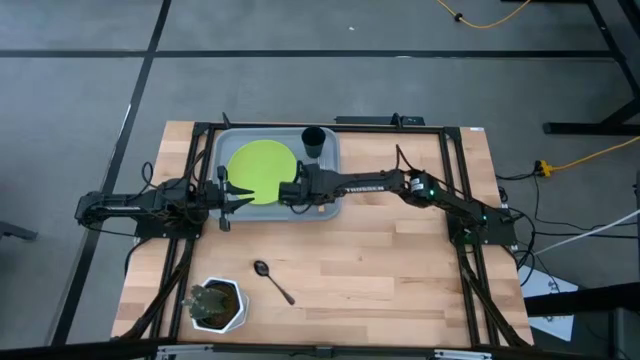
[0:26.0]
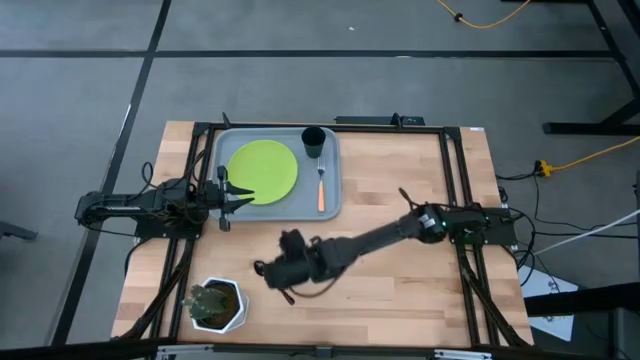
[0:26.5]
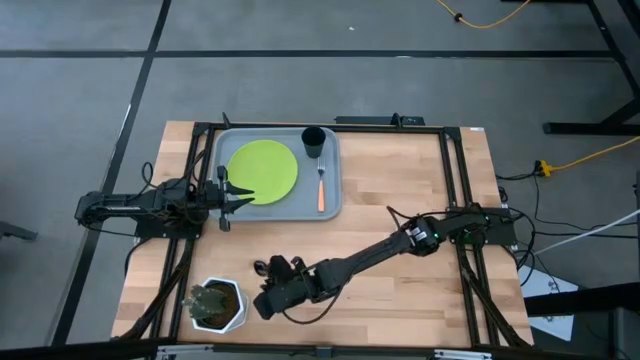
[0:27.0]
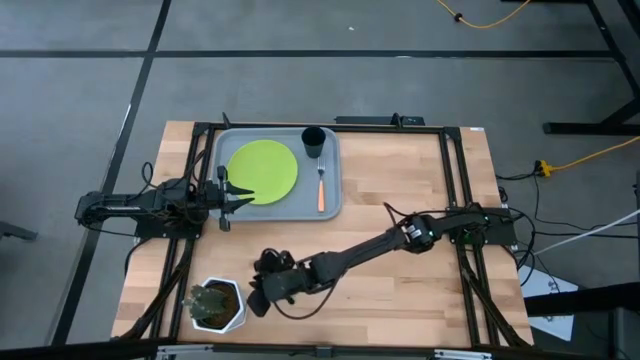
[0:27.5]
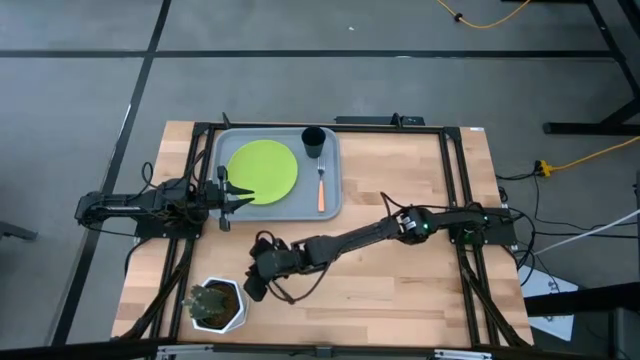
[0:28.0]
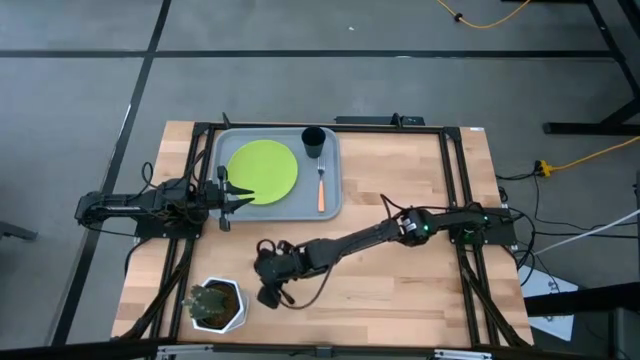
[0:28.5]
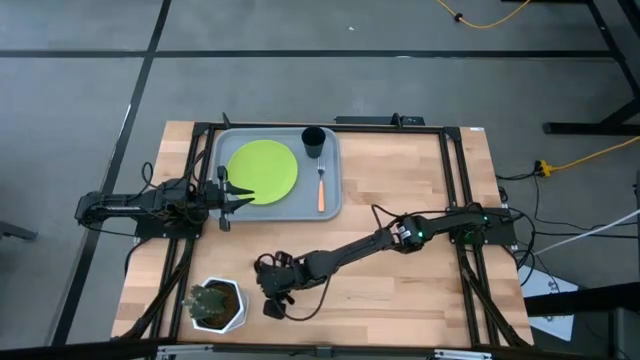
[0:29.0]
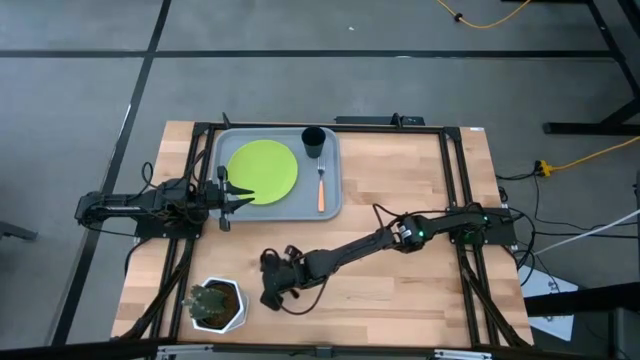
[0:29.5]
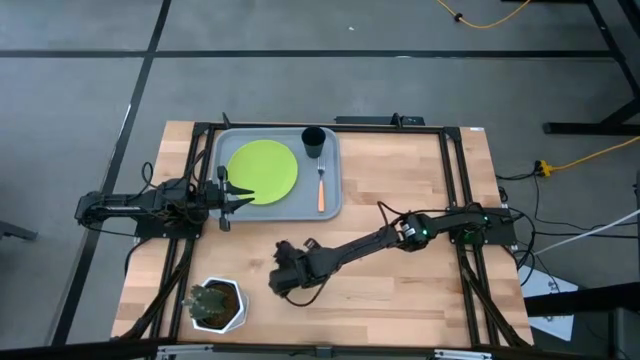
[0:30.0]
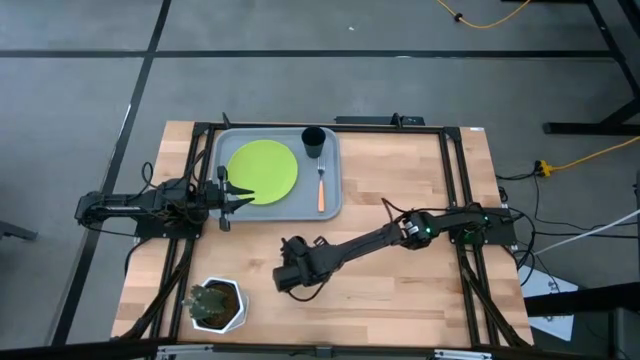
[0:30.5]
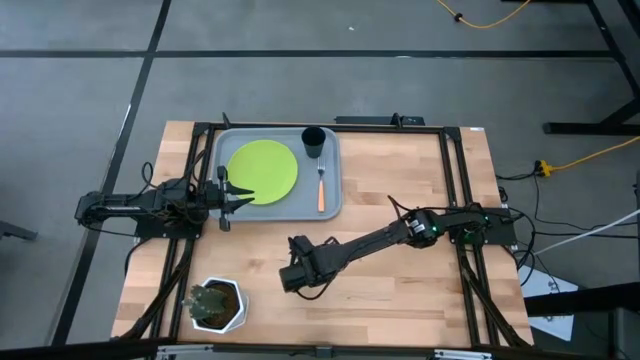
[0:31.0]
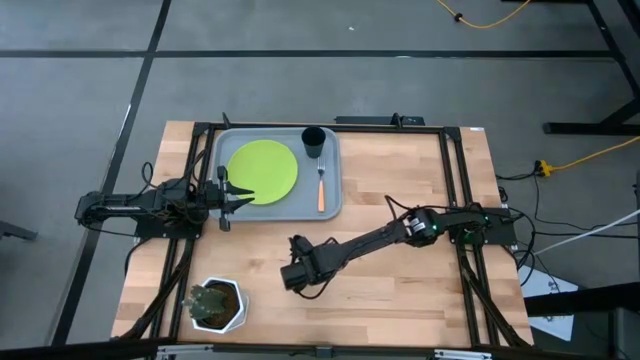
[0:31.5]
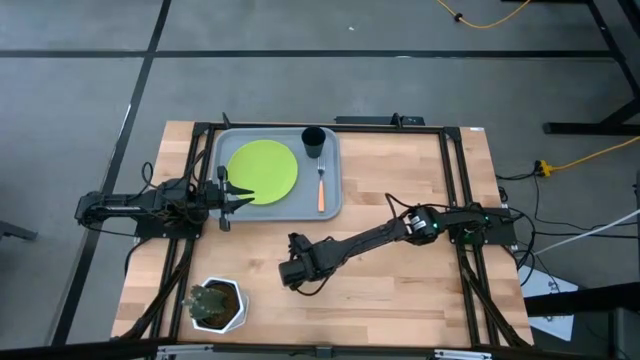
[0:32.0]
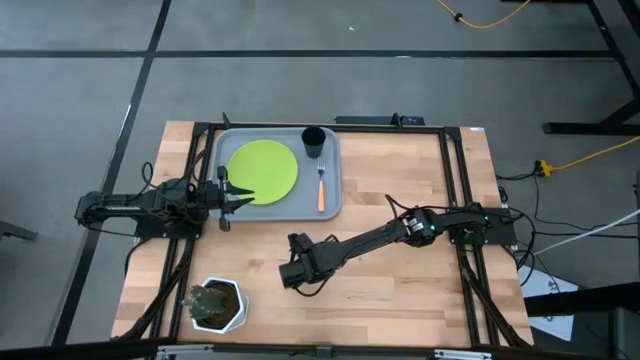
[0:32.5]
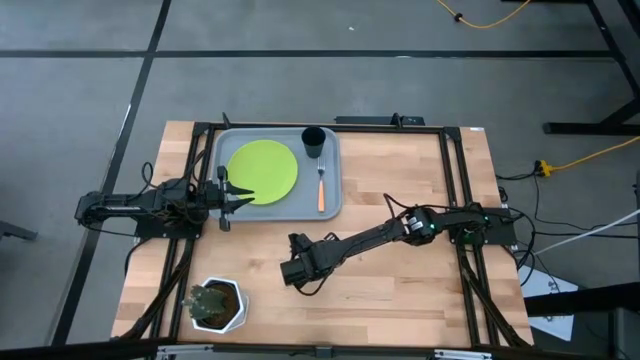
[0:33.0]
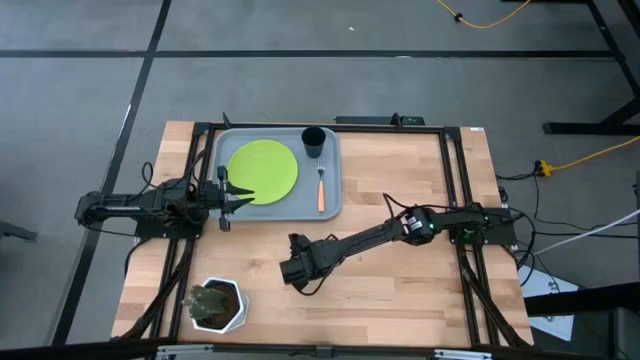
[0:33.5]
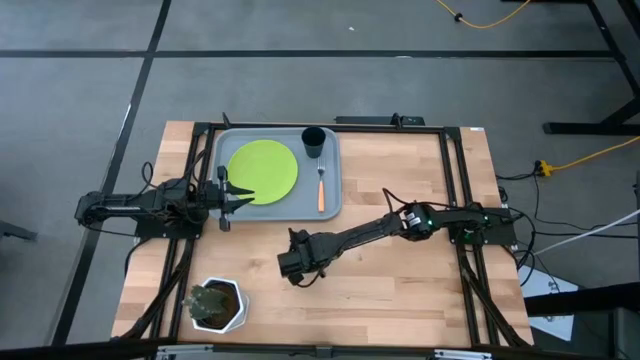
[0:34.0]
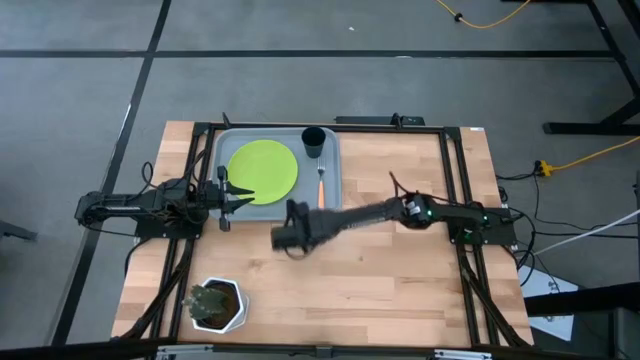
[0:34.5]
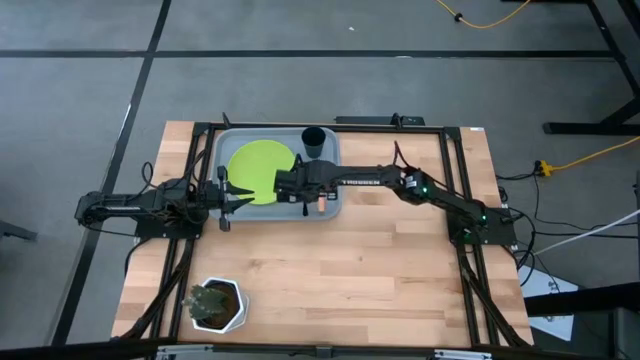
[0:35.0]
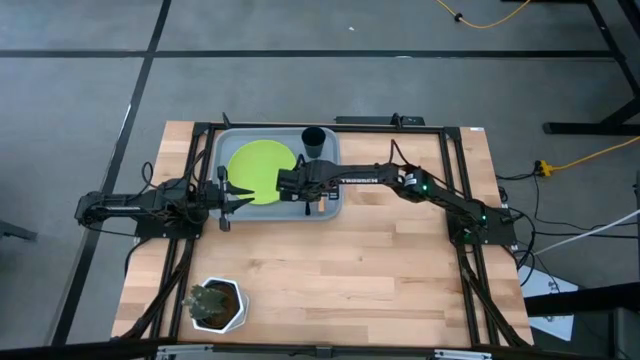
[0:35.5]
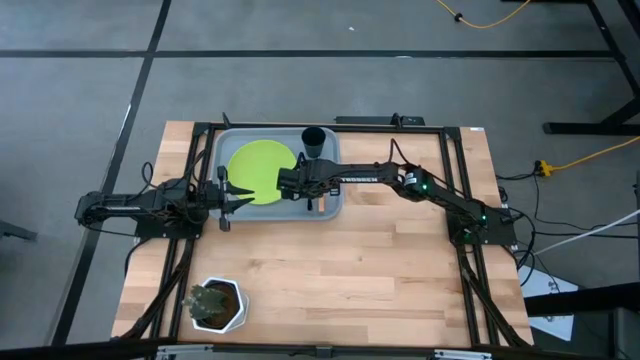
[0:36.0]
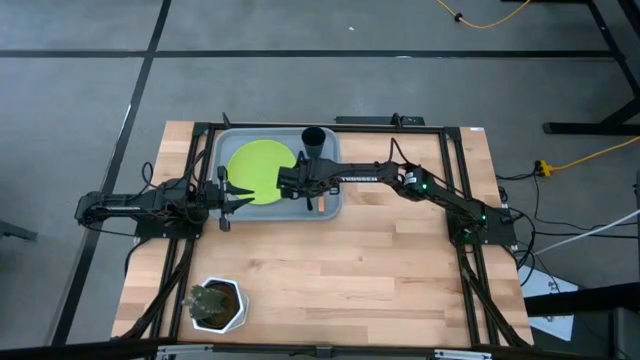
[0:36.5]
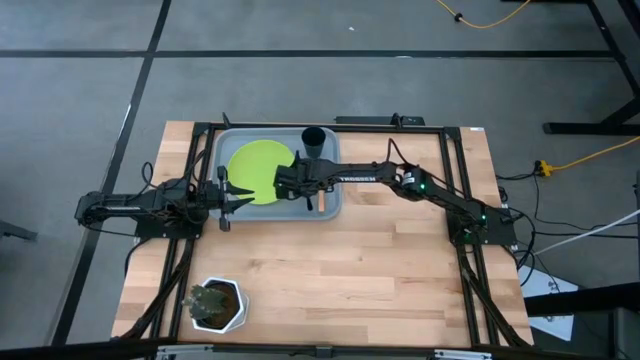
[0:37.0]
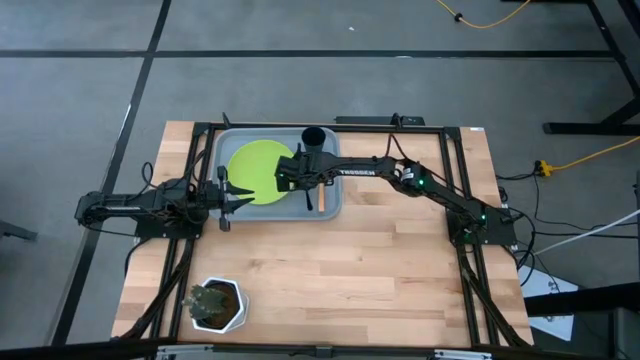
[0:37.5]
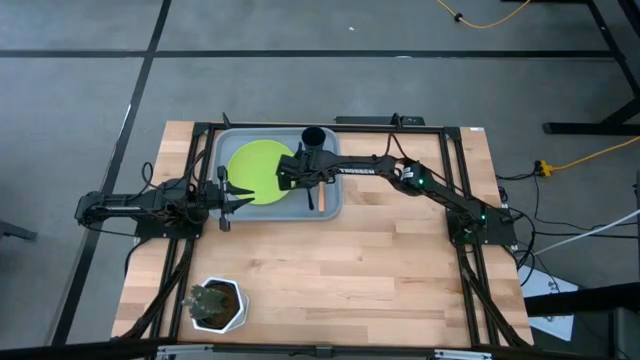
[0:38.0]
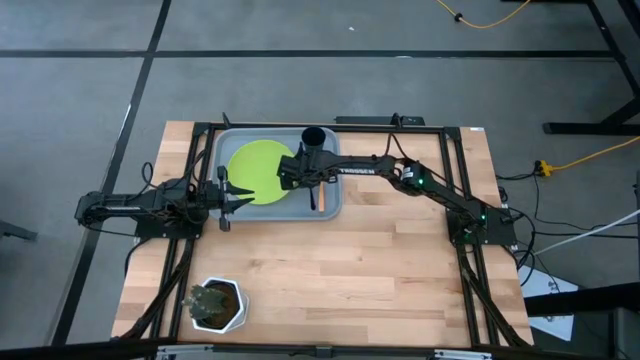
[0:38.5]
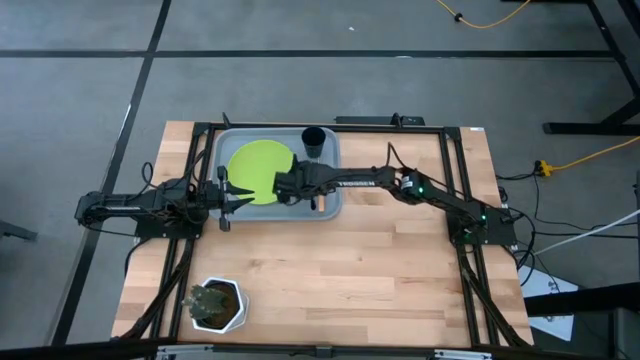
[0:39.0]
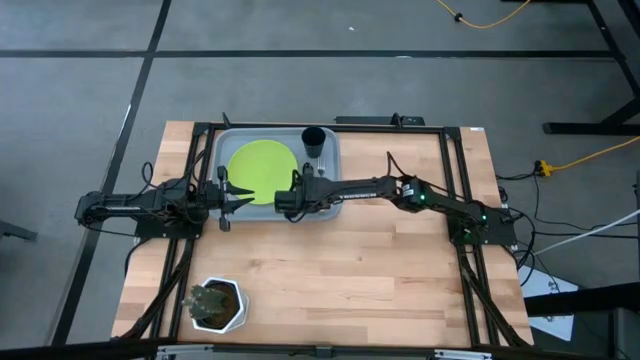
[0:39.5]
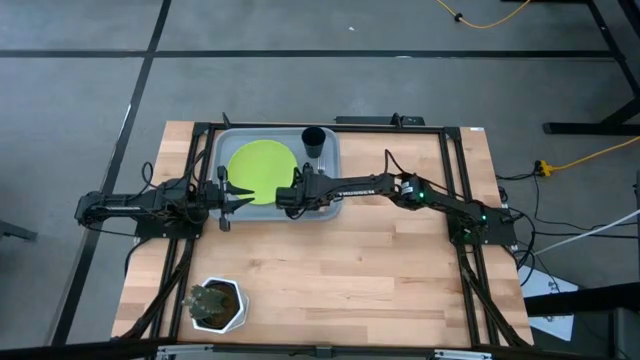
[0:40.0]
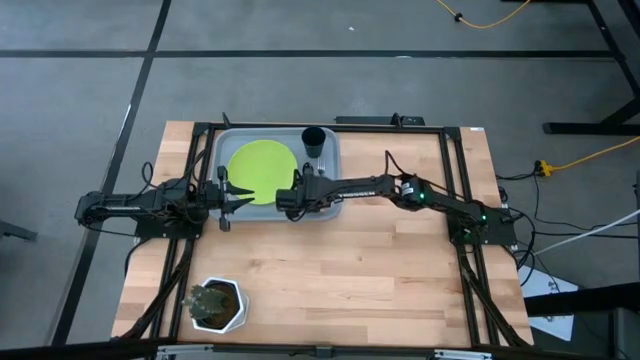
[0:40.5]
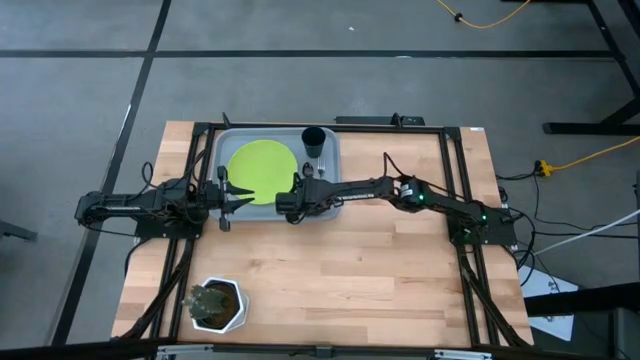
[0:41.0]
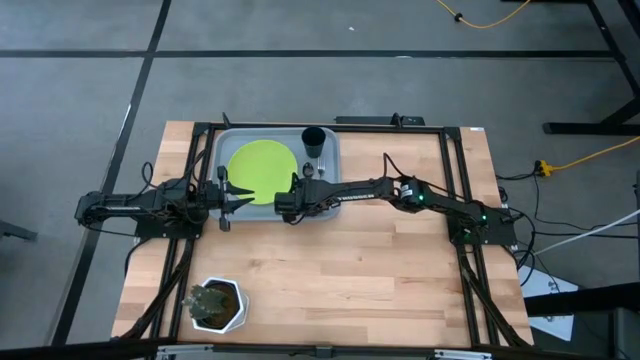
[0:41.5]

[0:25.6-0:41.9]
Task: Pick and place plate/cup/fork/spoon on tray
Put the black spoon on the blue serving tray to the left of the orange fork

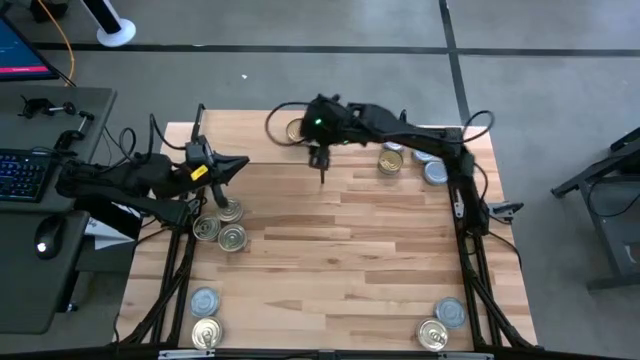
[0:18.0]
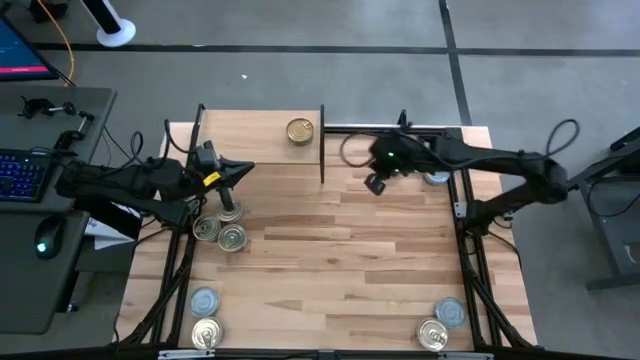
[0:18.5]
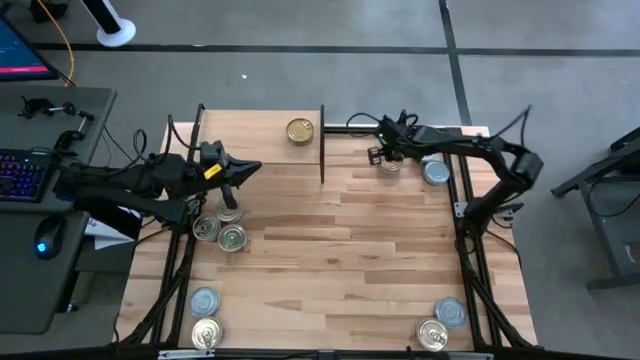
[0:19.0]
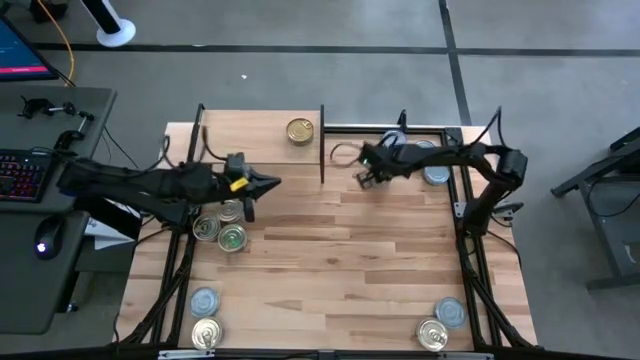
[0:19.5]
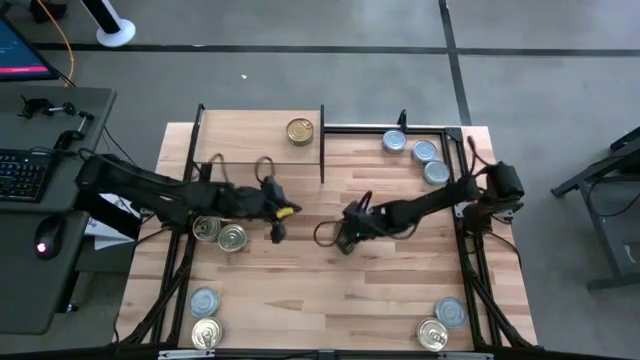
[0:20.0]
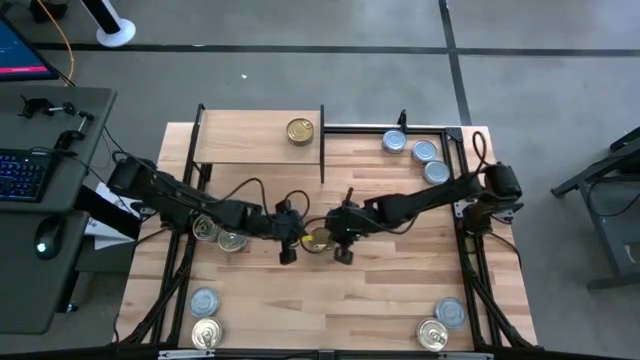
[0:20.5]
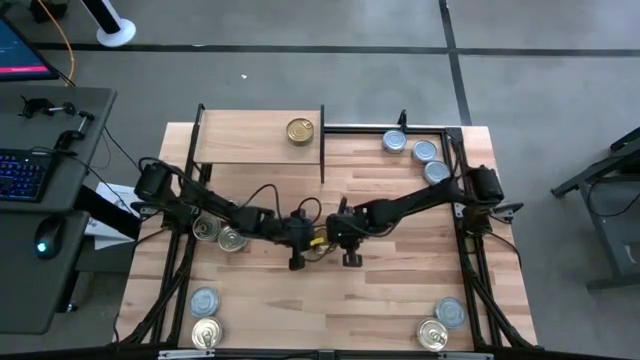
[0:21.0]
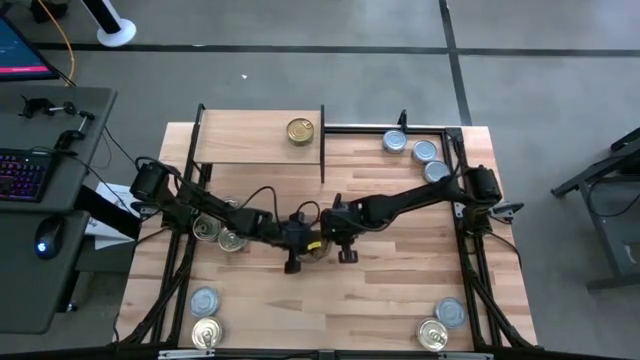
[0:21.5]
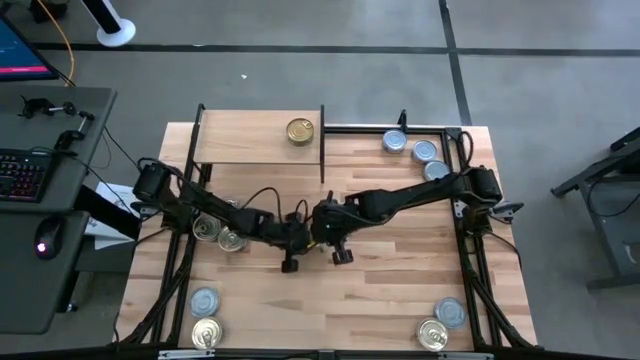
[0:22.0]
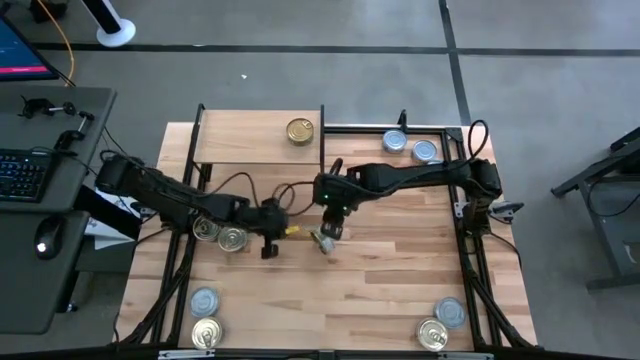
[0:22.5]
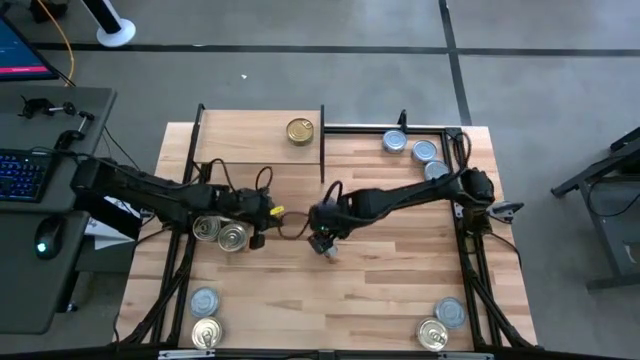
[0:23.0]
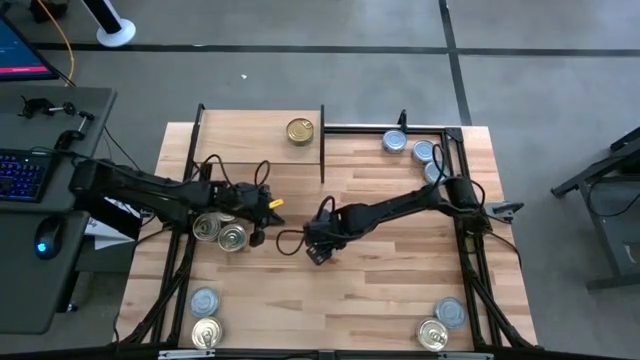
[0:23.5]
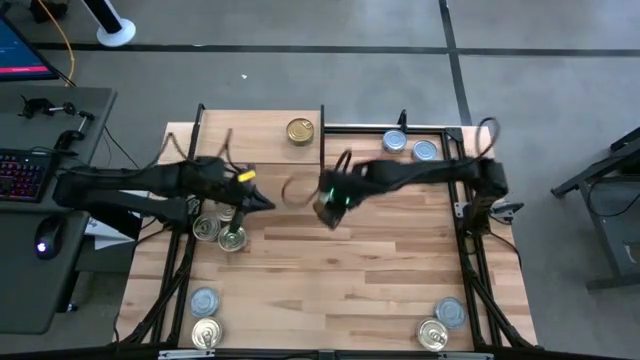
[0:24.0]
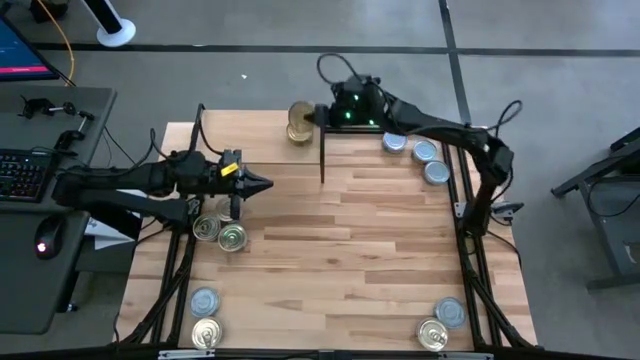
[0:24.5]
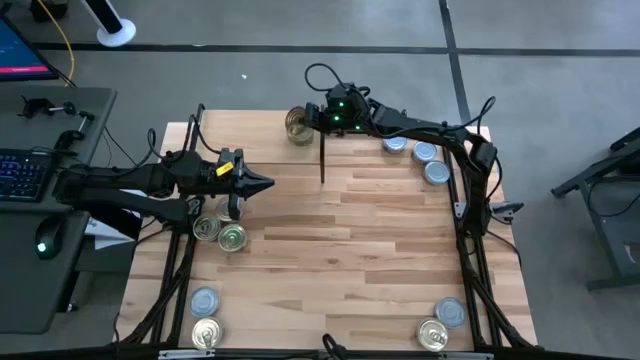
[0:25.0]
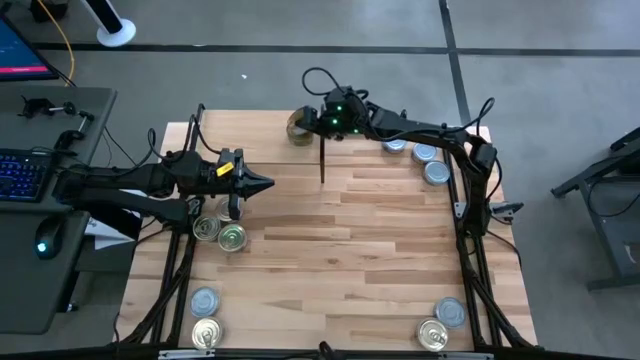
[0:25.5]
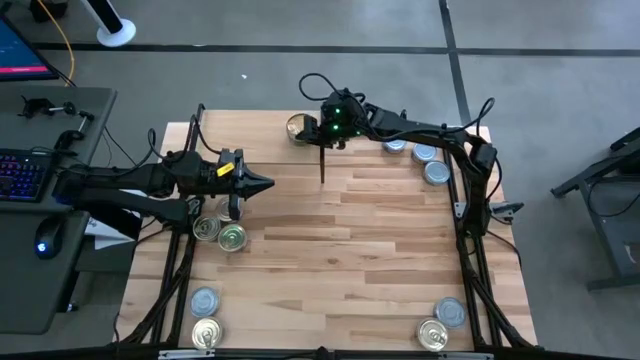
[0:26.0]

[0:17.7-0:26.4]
Task: Stack canned seafood by type on shelf
Stack the green tuna can on top of the other green tuna can on the shelf
